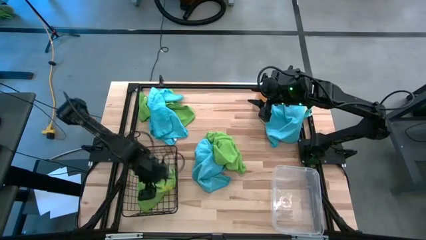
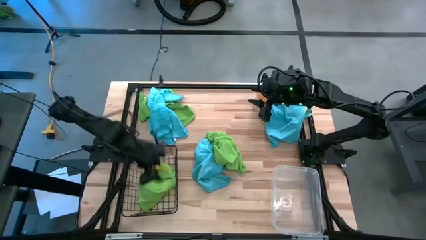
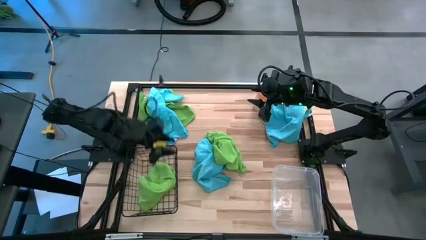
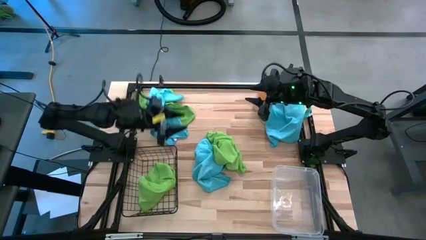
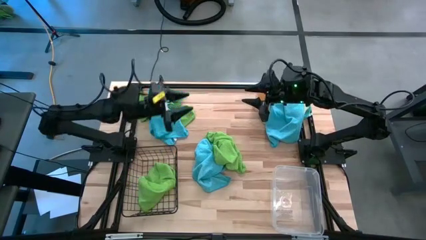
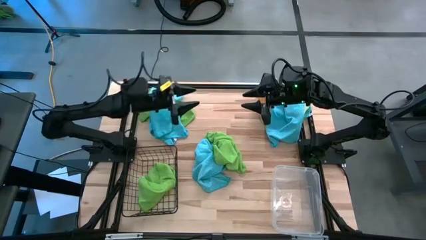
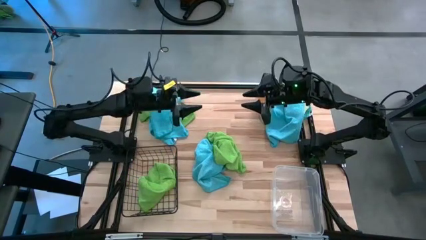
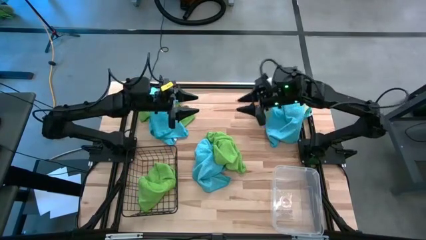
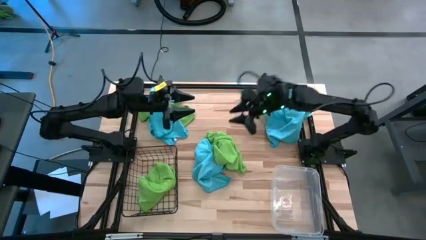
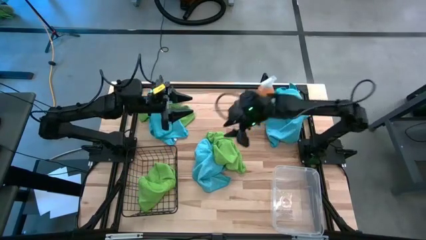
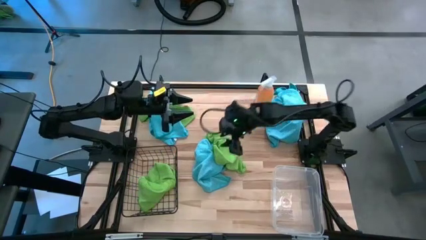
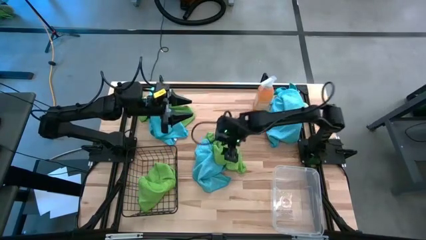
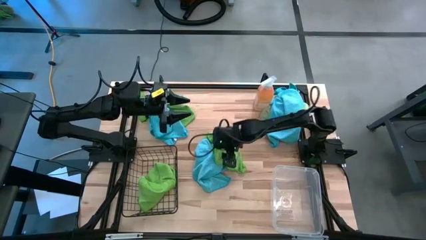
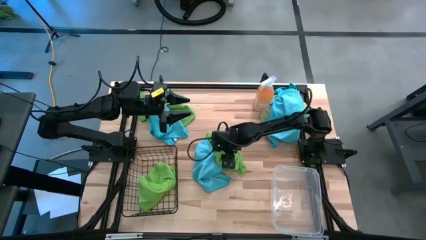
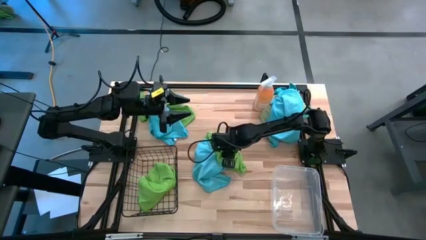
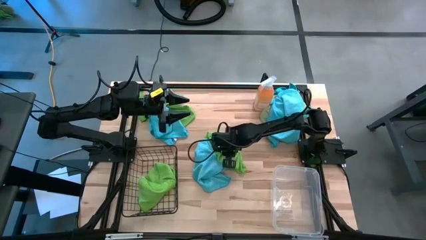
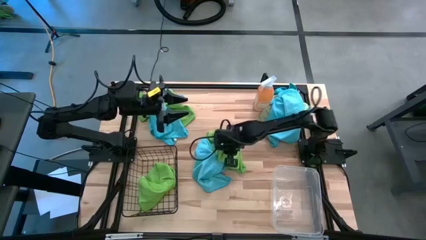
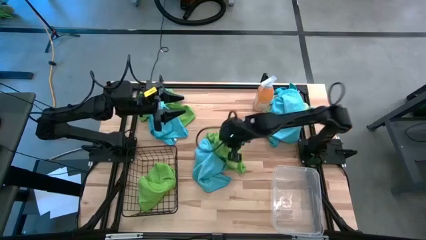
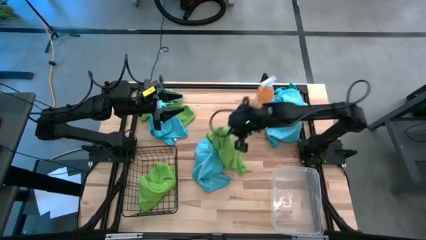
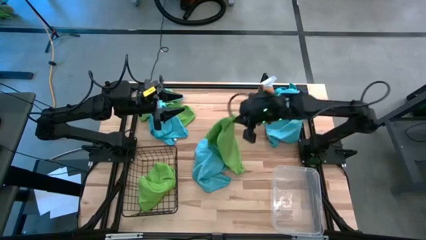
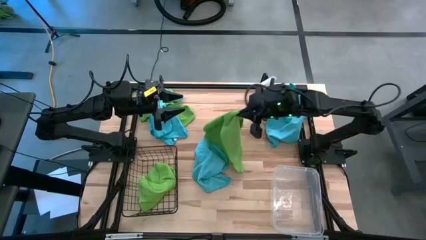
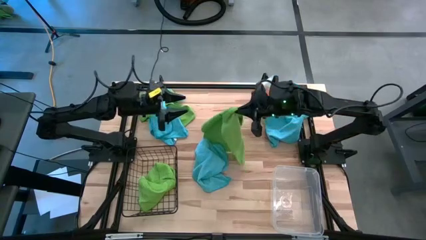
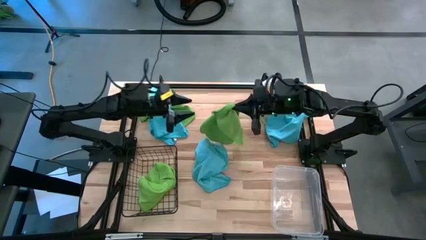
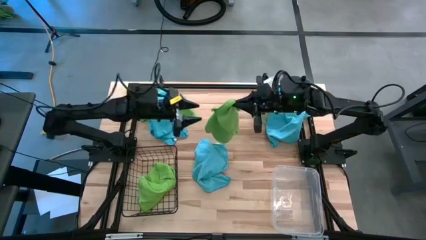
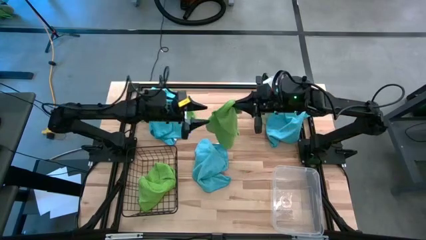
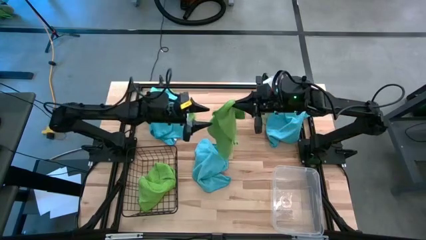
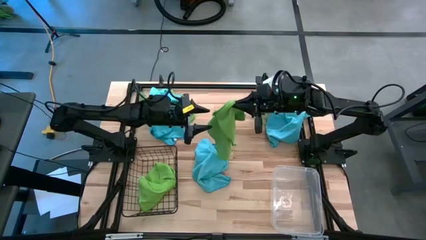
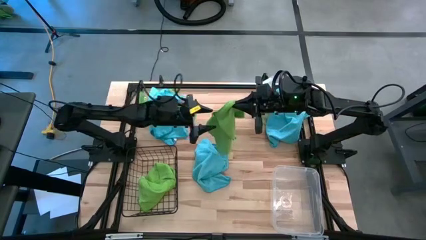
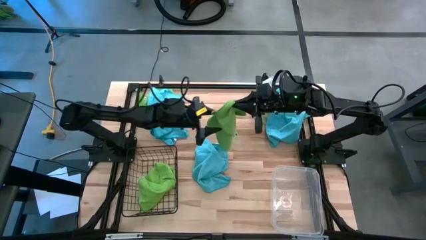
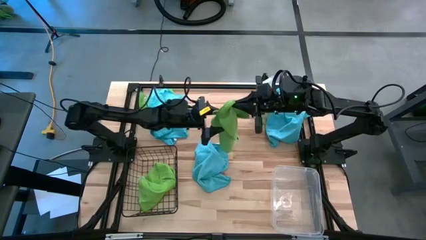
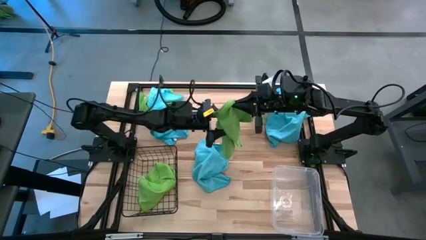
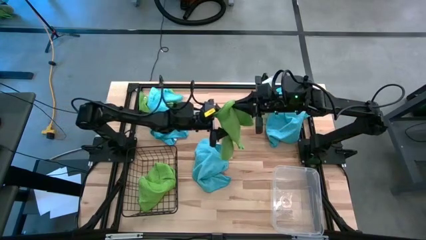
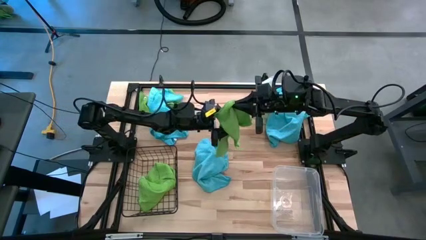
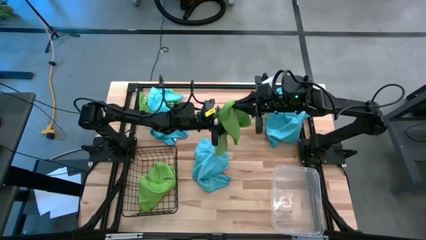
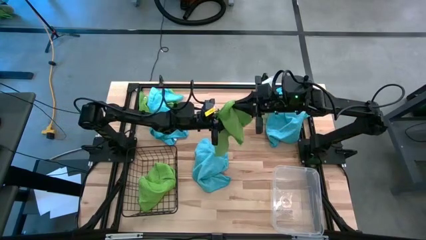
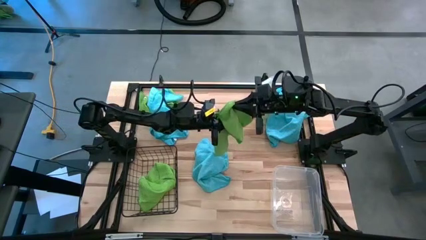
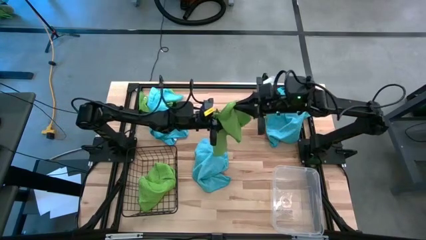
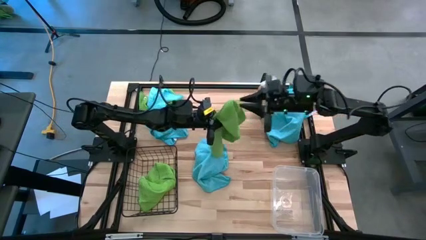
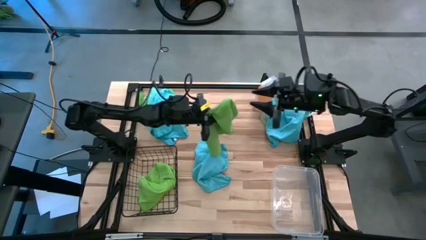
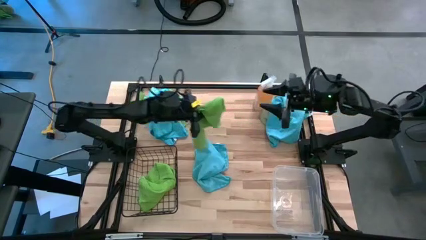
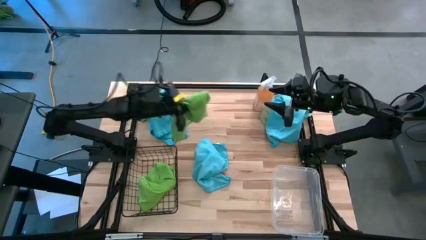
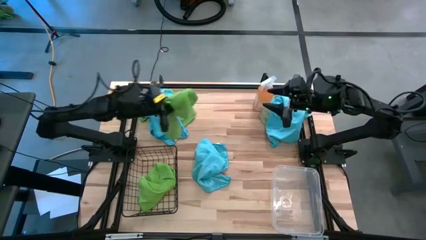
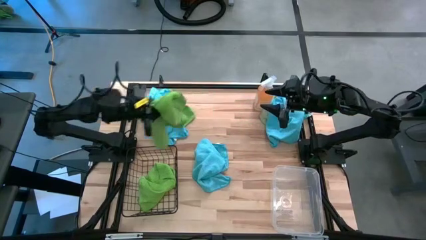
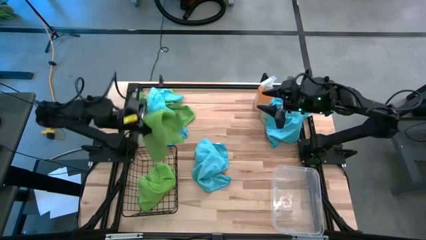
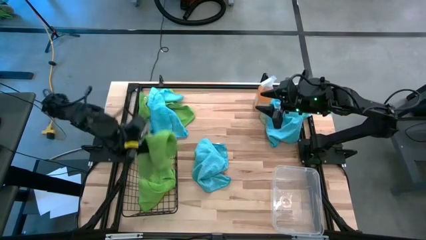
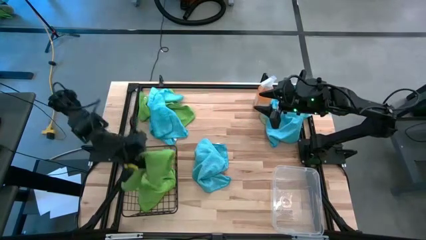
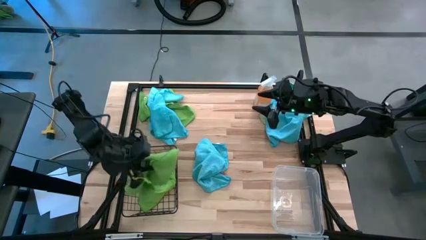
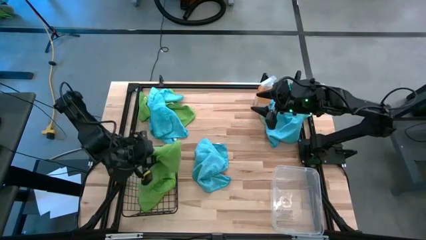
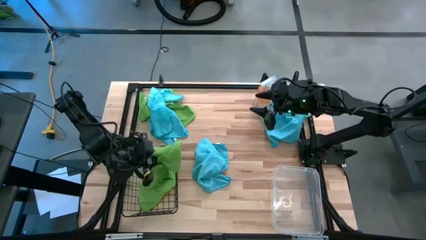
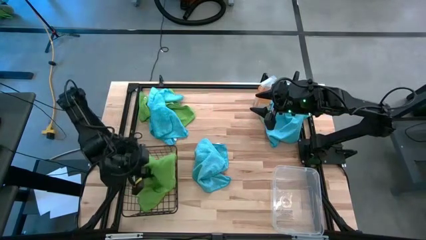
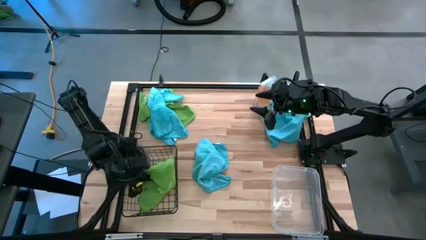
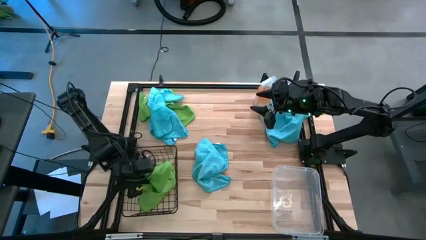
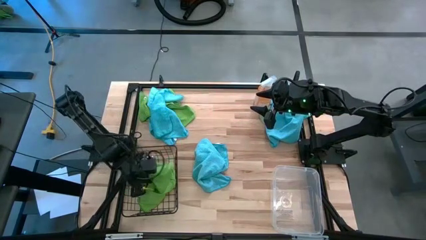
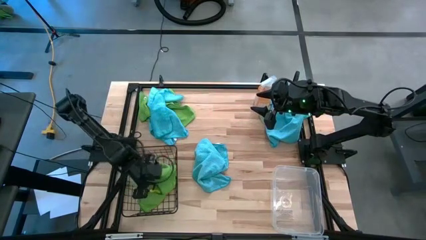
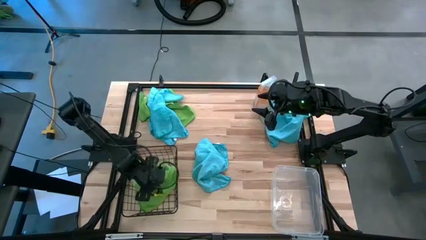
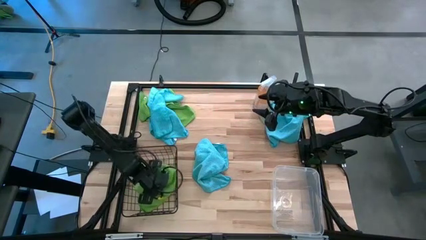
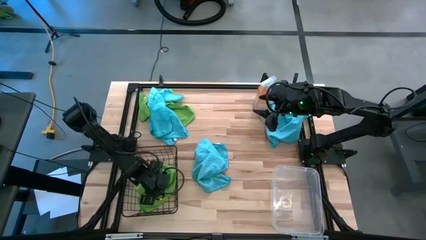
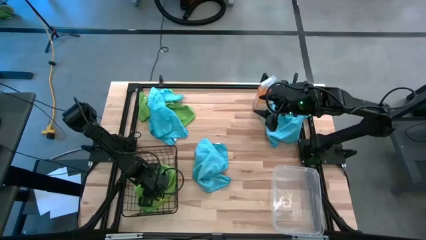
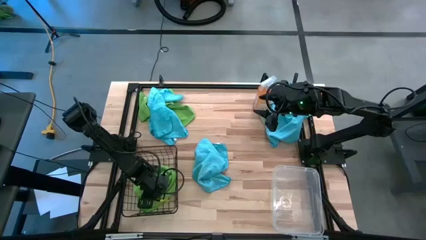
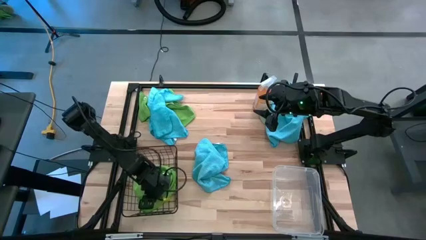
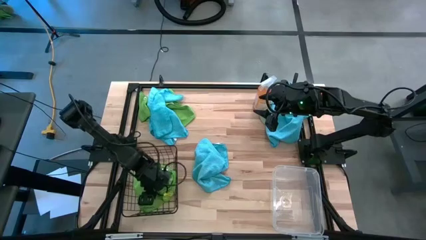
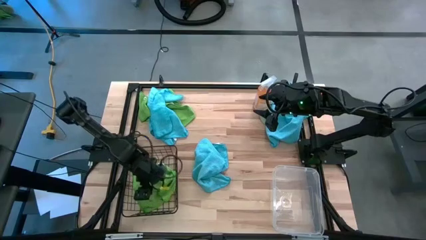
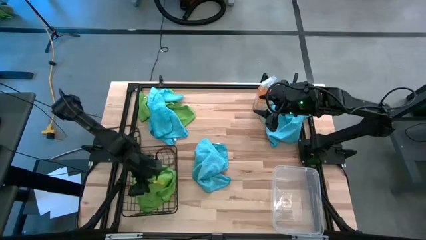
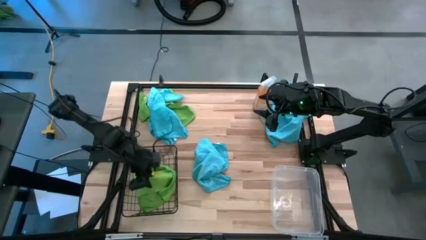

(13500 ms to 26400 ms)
Task: Sort microfiber towel by color & place in baskets
Put the green microfiber cloth into the black wire basket
